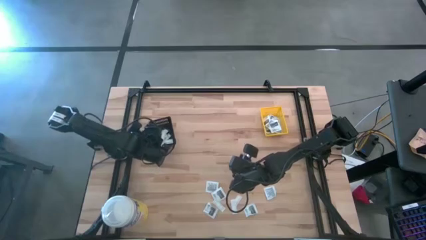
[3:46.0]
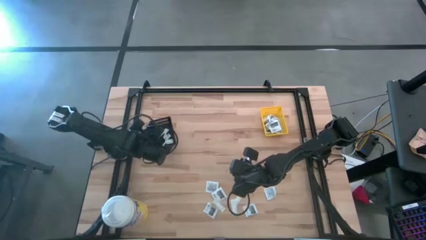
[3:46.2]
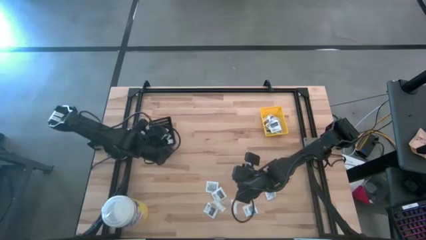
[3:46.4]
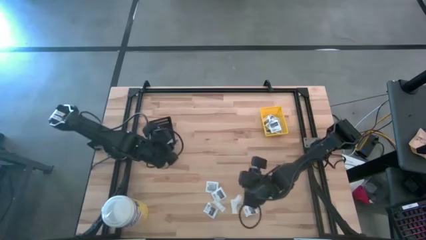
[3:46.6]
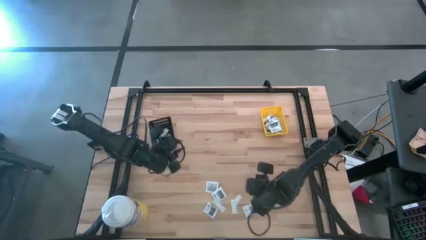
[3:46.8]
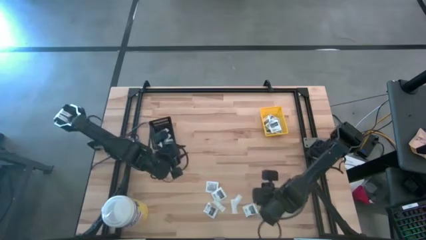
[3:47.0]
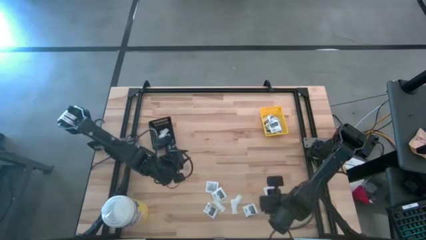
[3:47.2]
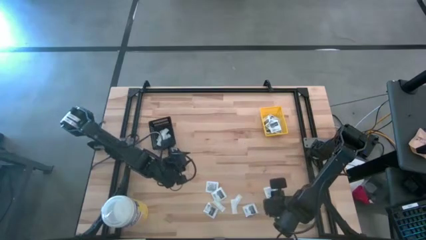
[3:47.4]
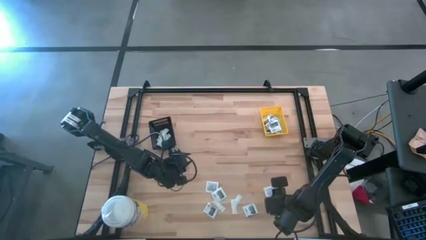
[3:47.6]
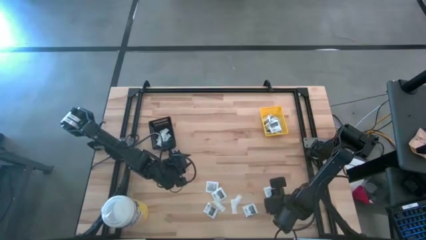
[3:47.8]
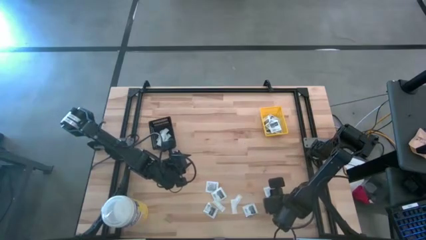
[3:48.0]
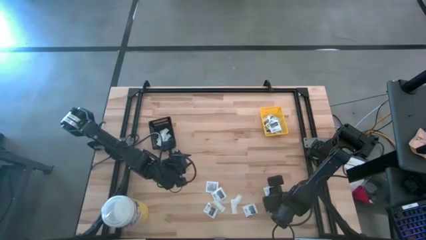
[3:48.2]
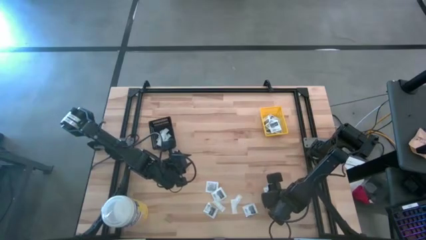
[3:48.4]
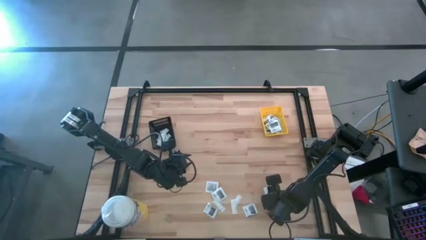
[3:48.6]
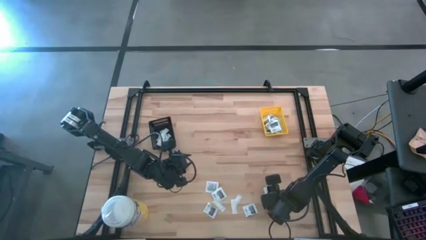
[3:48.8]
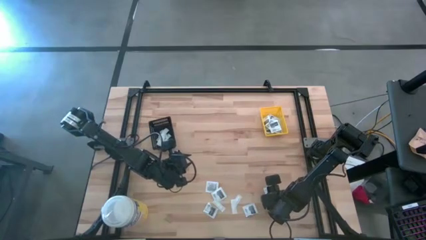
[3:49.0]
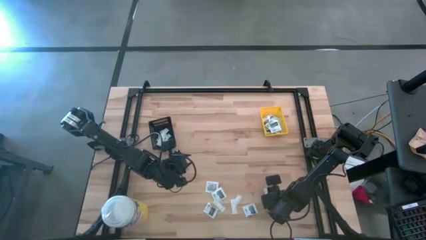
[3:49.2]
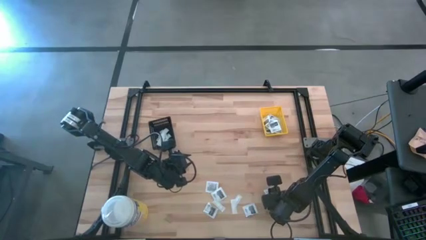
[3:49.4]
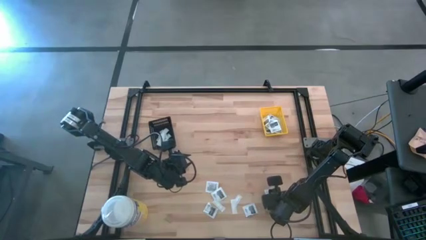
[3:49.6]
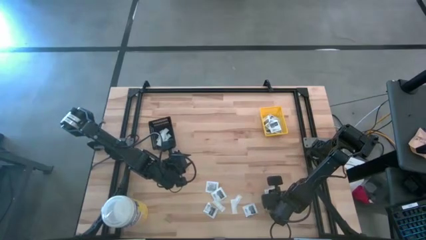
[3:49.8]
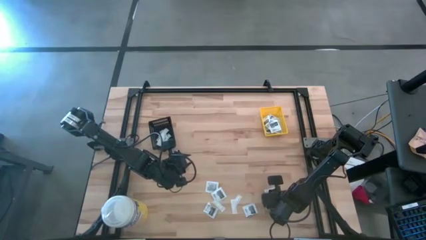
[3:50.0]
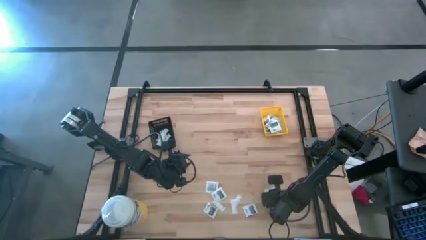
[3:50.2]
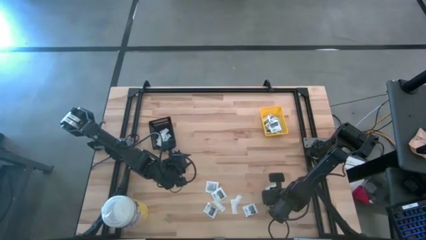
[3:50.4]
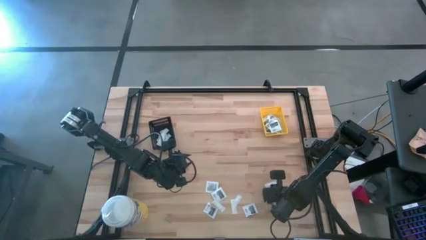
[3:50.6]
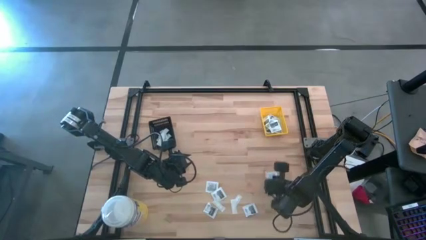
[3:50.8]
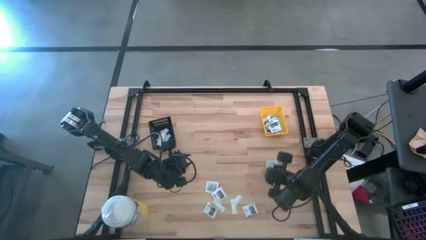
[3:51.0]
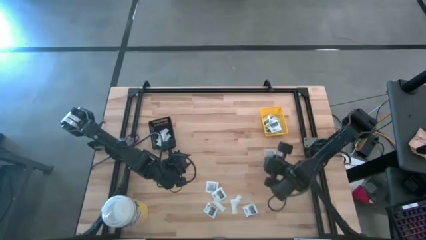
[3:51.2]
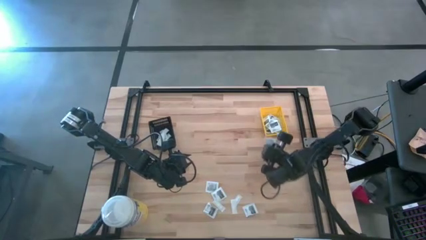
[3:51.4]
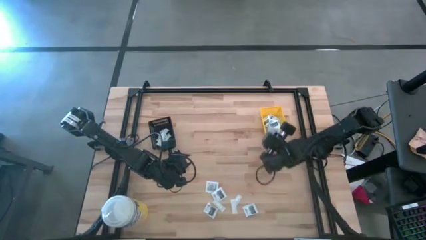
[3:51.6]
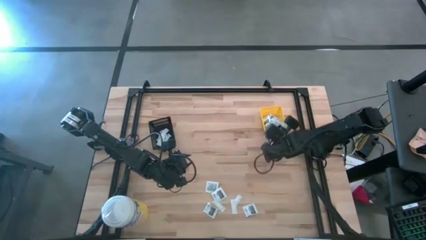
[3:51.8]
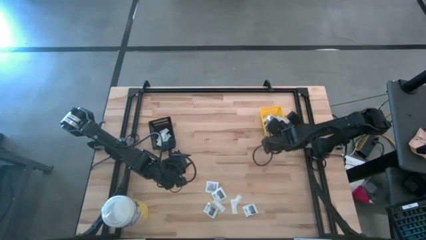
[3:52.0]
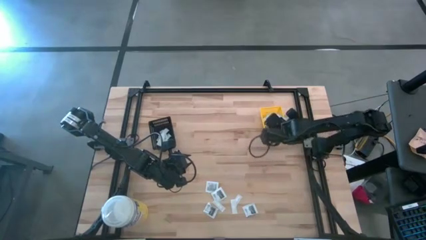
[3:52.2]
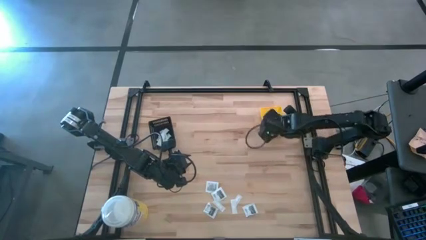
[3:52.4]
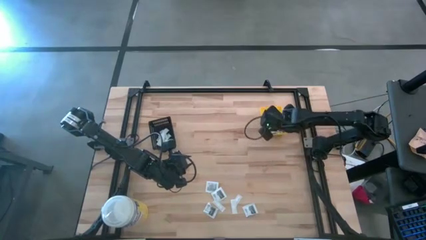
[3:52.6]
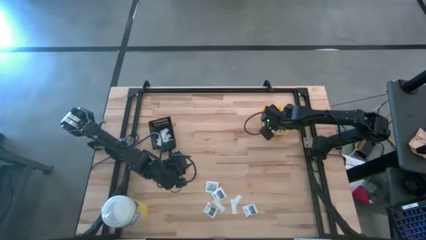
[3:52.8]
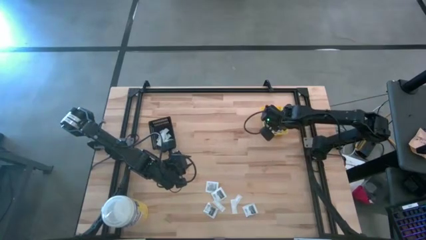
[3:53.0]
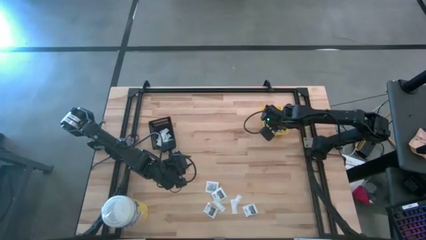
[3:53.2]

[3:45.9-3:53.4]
Task: Pick & Place First Aid Supplies
Put the black pad into the yellow bin

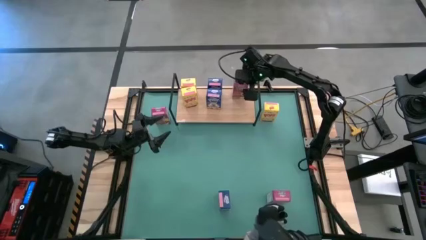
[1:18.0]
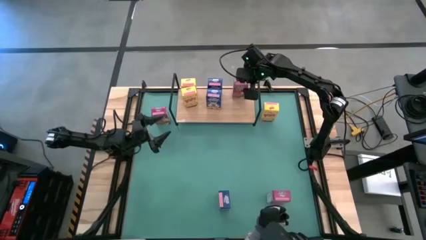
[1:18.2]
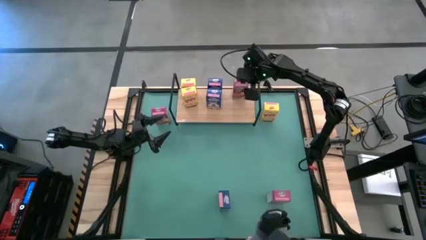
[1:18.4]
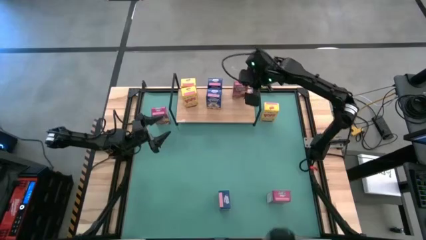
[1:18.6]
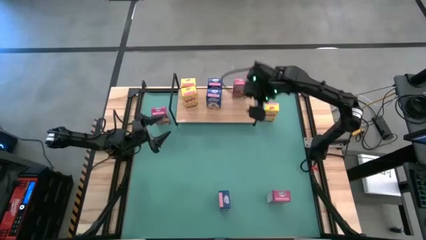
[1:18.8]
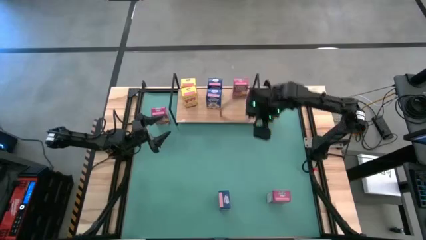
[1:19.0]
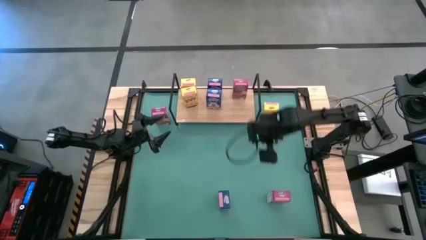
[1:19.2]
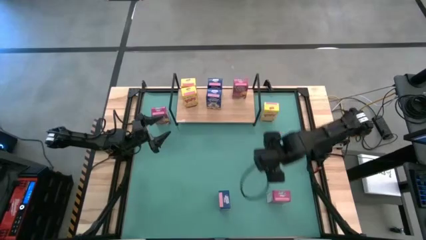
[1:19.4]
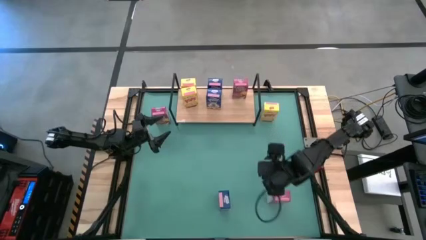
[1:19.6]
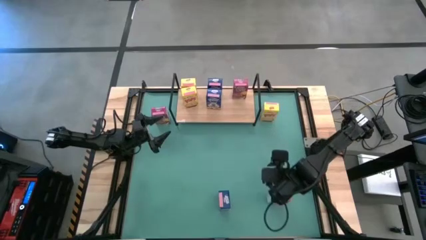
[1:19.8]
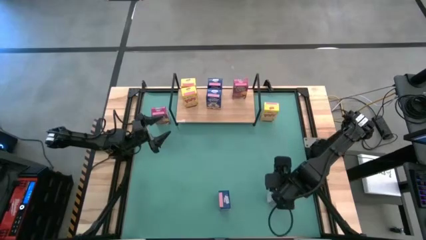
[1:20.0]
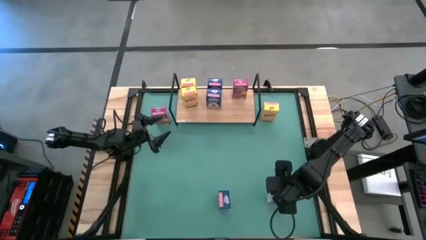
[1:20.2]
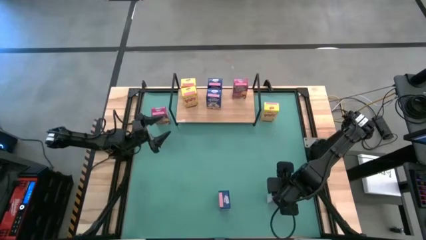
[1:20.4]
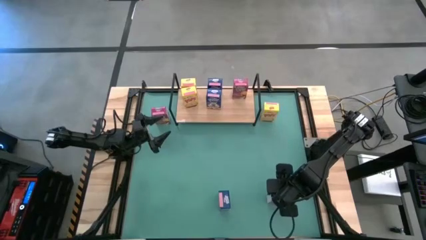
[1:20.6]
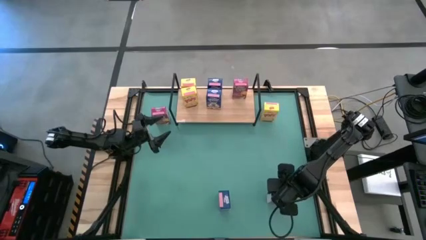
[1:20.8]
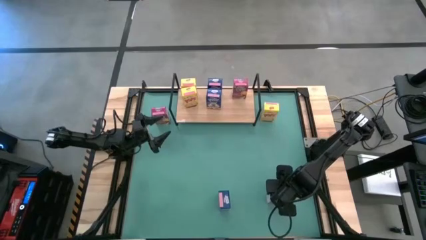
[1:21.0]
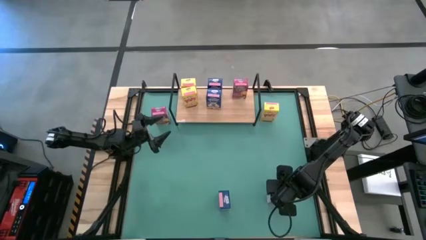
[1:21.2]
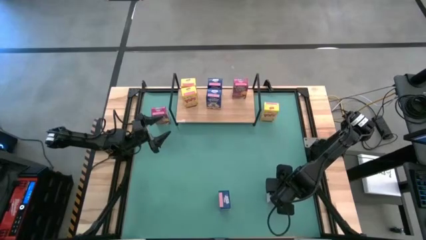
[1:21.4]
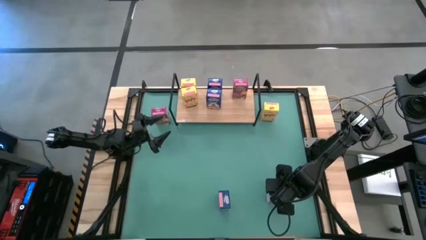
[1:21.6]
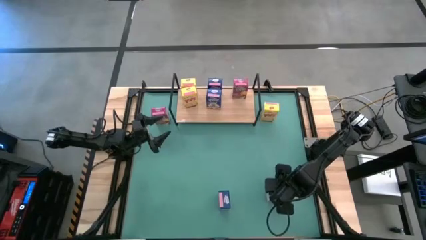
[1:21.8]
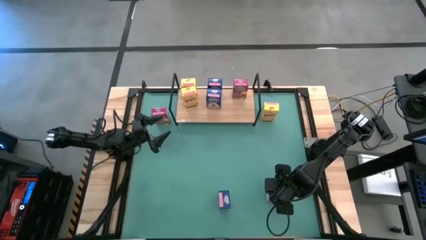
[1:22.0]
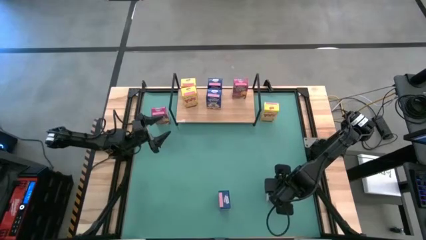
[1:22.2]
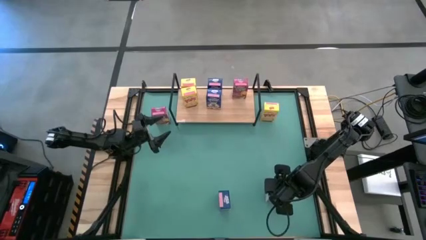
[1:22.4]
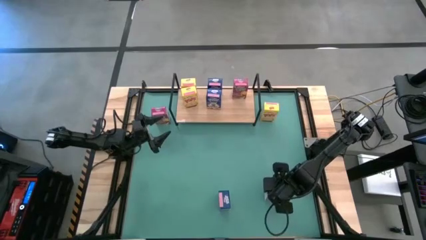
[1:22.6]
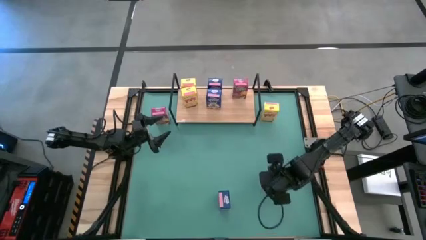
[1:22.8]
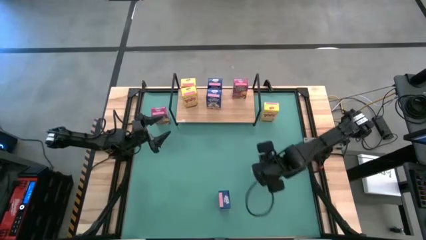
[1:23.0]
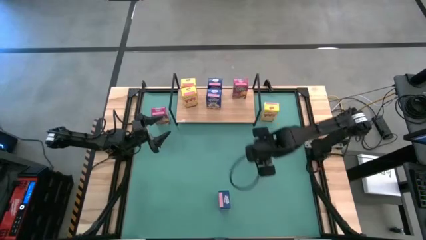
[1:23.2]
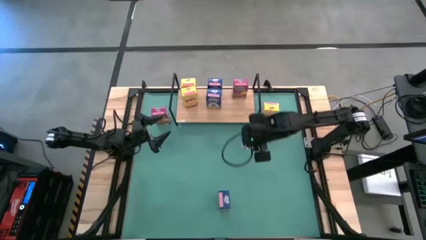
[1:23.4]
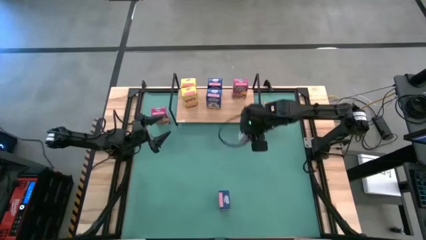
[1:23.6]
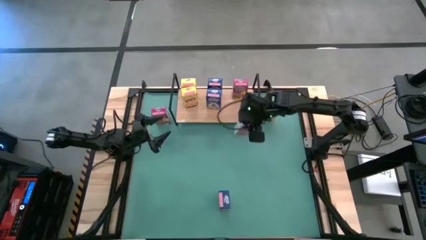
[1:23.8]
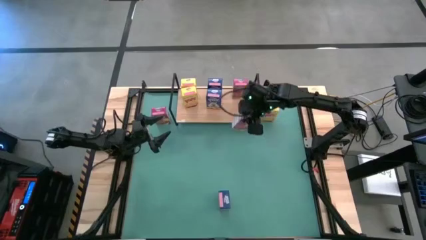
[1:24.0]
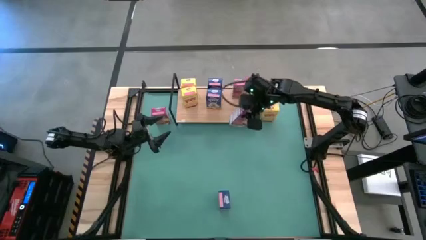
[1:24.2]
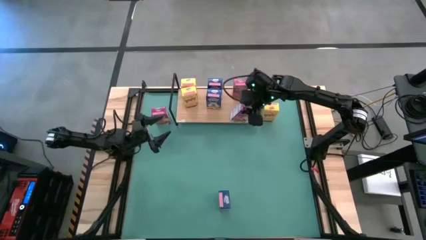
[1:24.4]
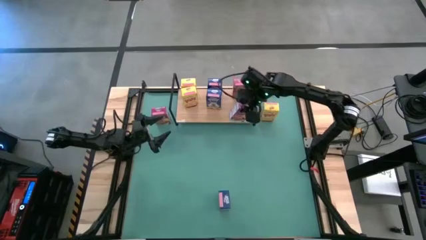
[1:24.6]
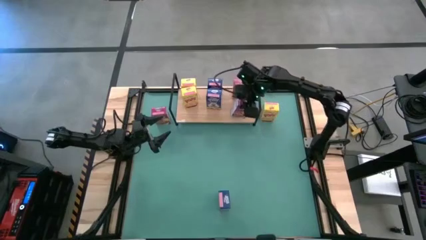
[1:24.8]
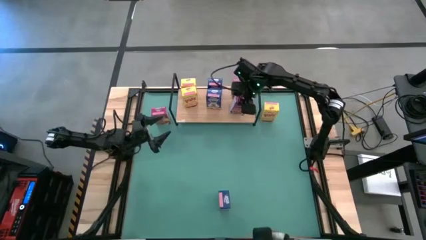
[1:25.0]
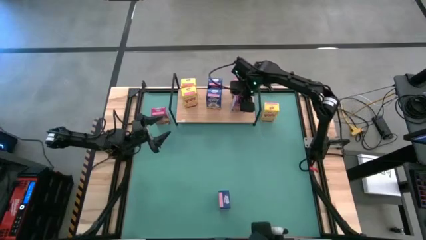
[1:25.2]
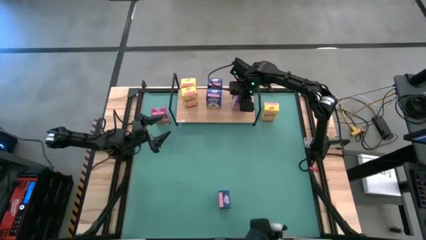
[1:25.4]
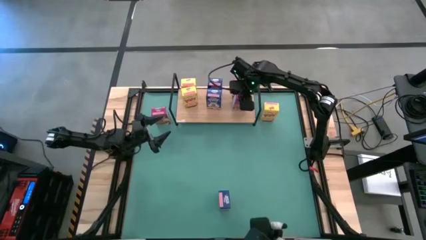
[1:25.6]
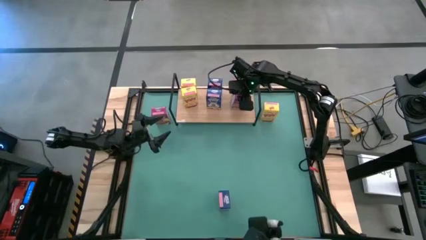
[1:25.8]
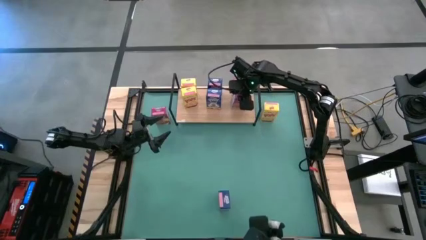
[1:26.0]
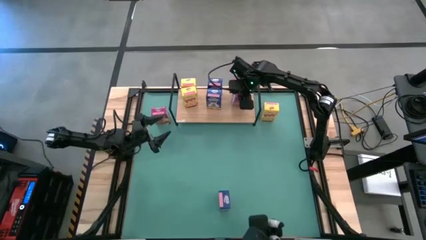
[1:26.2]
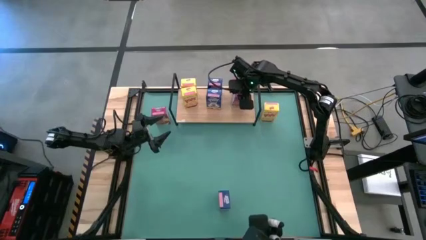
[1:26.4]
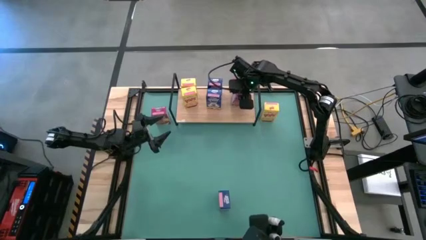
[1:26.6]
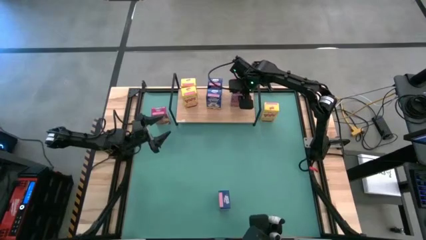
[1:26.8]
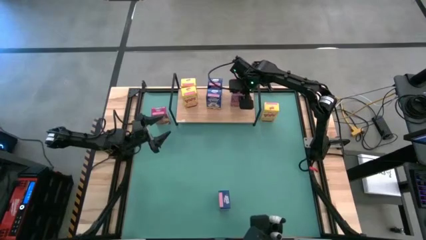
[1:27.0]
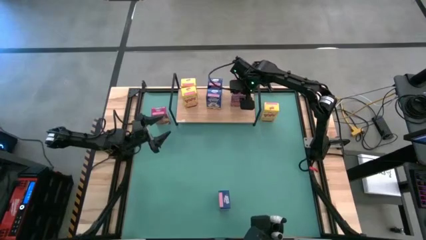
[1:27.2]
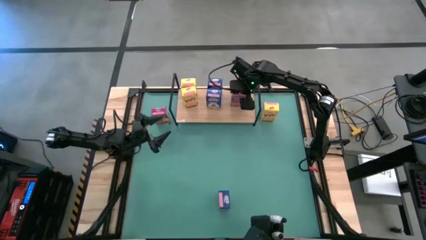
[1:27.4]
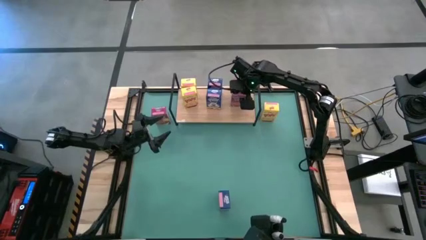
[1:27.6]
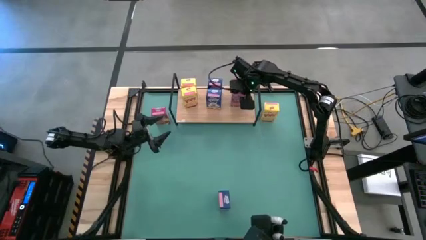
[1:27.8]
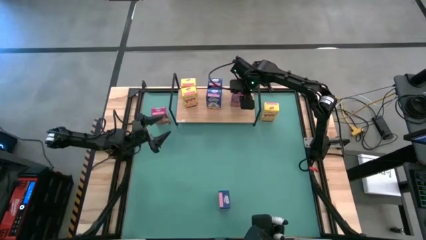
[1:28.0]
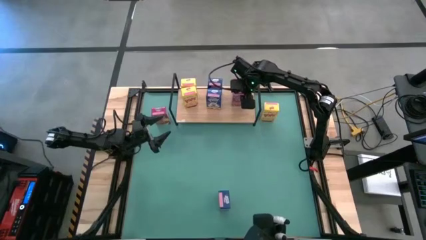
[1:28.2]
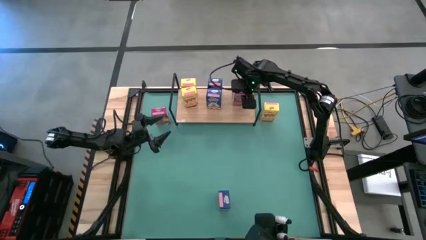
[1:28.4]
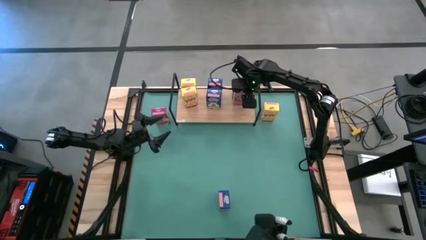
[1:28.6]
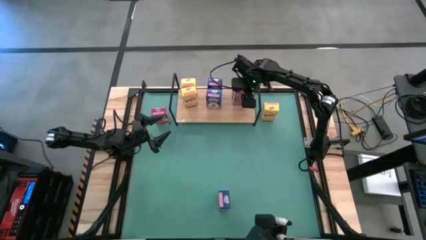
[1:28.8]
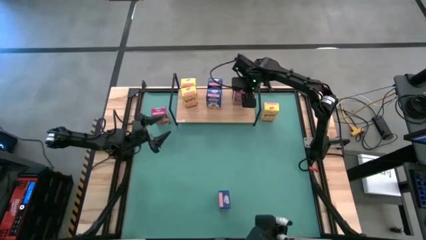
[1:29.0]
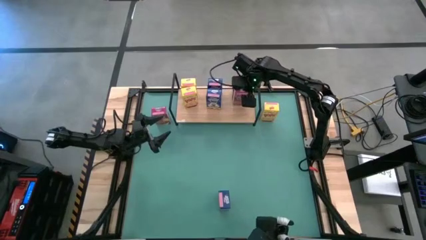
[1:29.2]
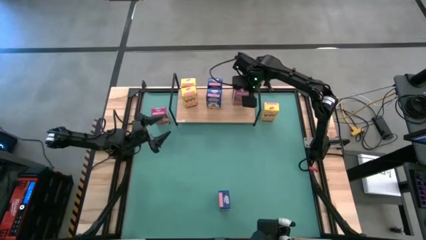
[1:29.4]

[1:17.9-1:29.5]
Task: Stack cereal on shelf
Put the bottom pink cereal box on the shelf aligned with the other pink cereal box
